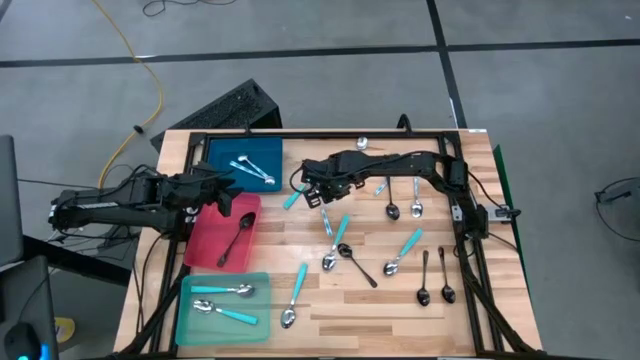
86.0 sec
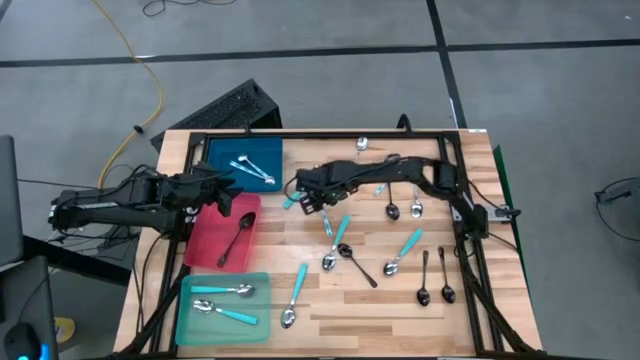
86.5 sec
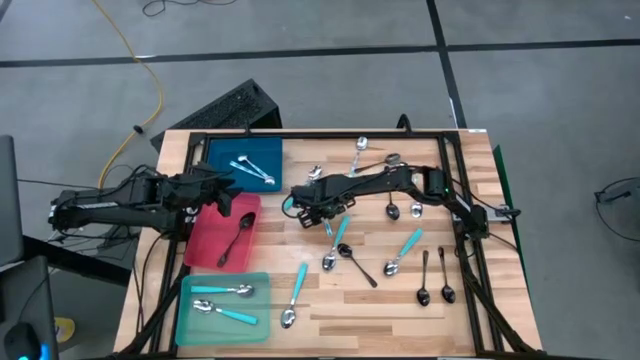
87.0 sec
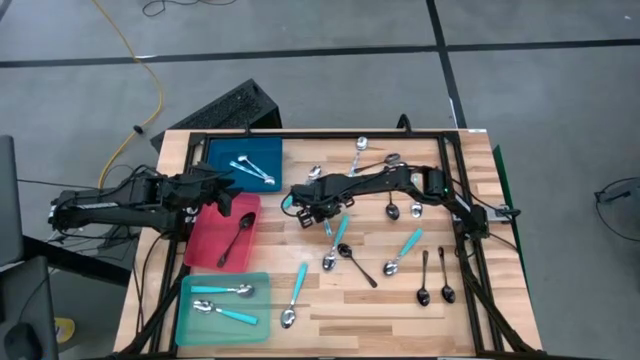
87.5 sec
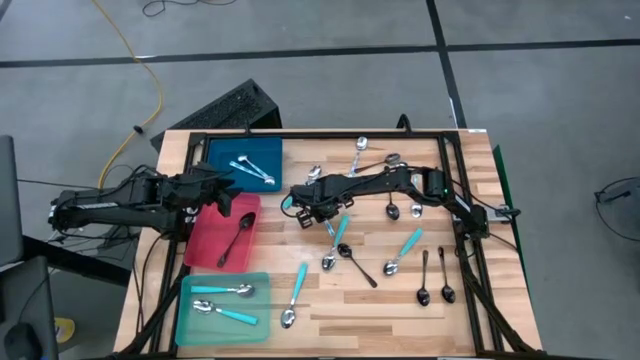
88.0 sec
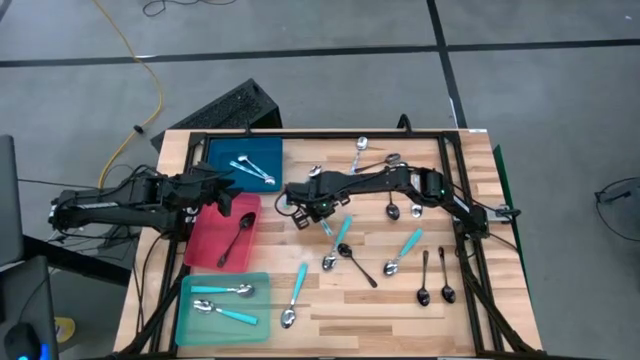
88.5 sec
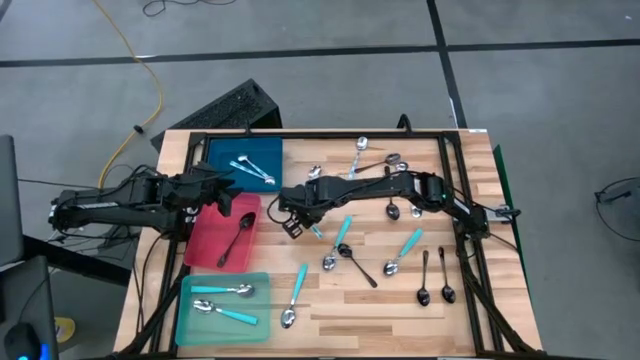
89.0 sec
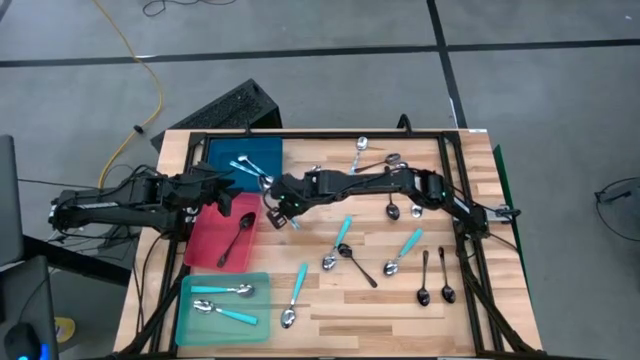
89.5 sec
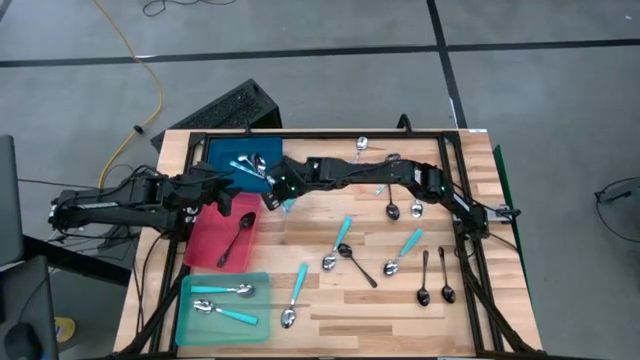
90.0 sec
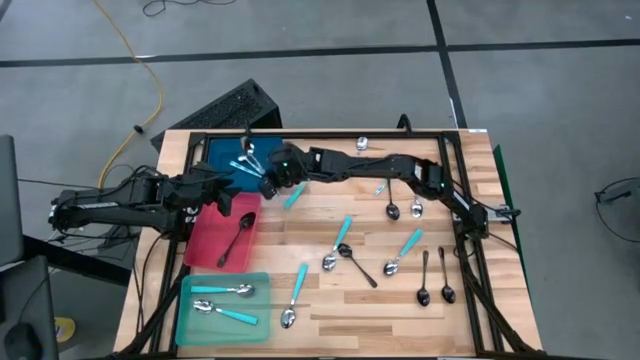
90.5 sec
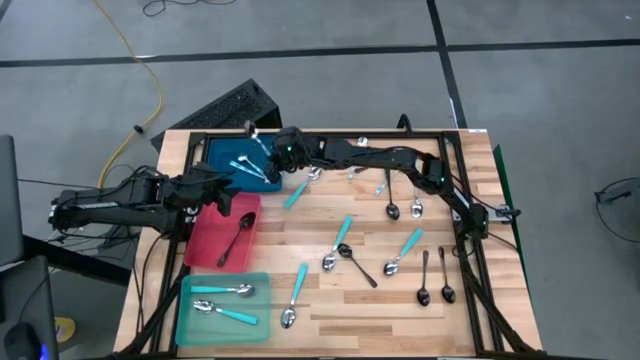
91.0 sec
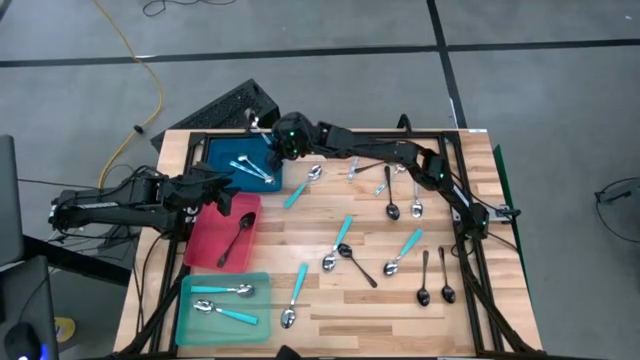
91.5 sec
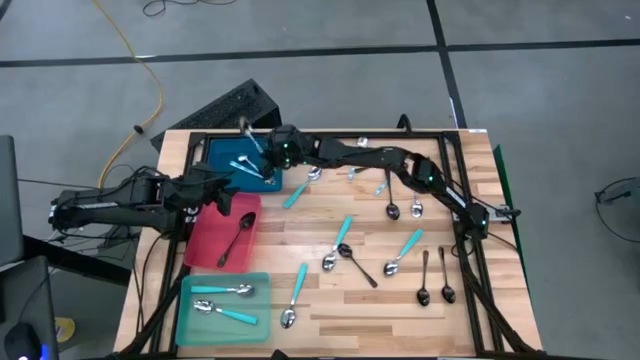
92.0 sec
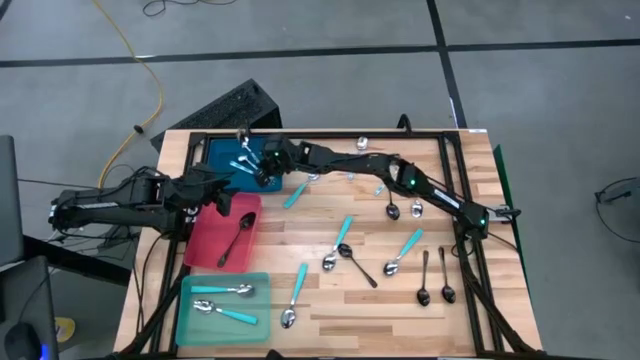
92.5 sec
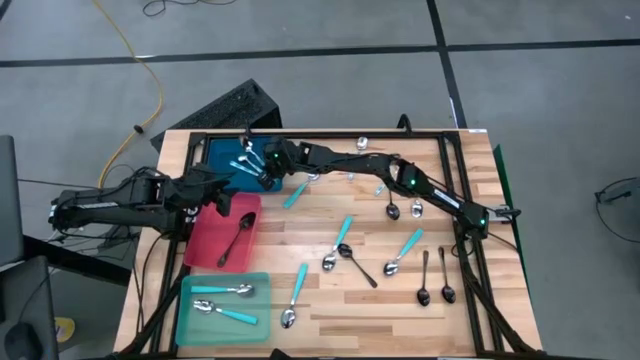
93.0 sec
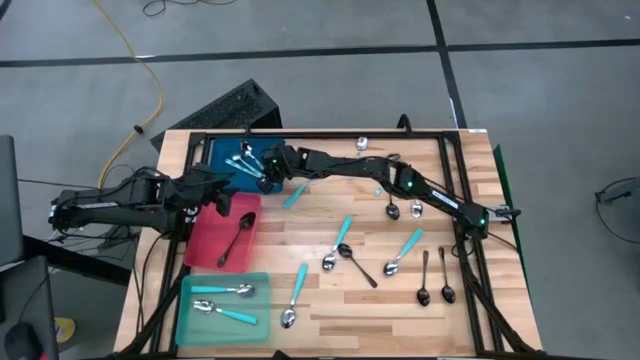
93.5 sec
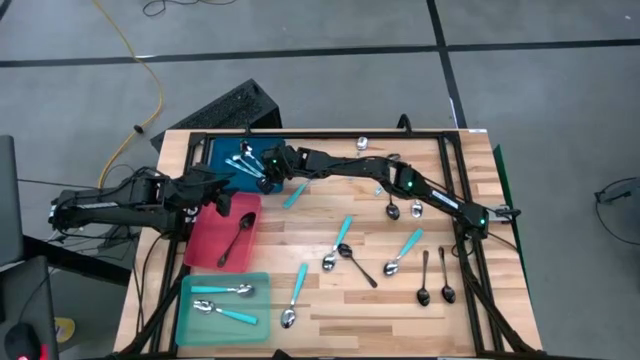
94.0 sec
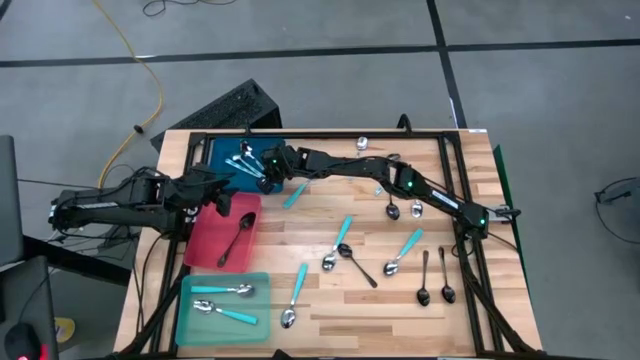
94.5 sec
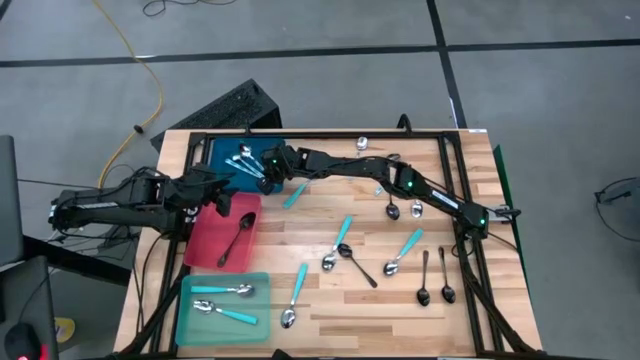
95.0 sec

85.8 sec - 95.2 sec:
Task: Sort silverware by color (type)
Put the blue patterned spoon into the blue bin

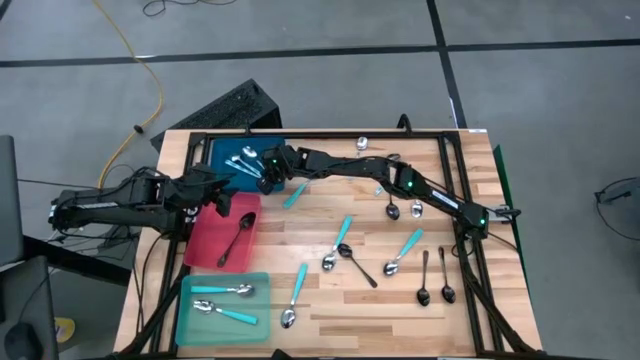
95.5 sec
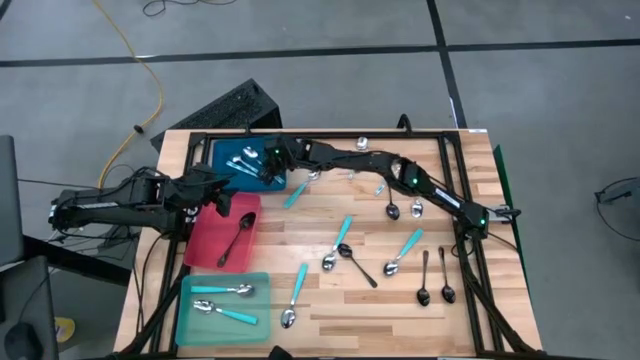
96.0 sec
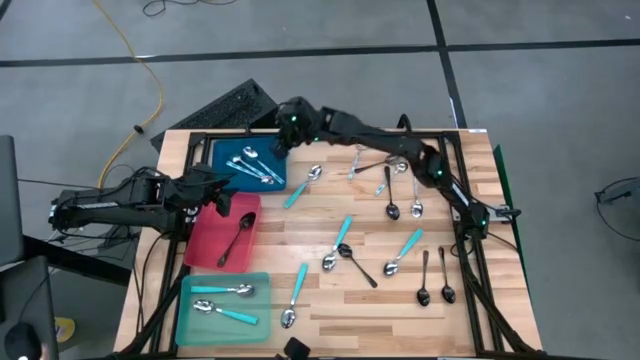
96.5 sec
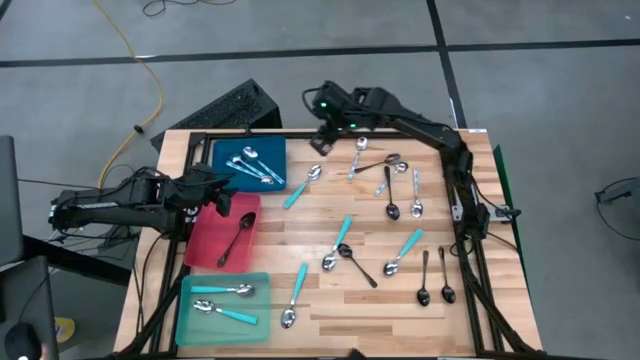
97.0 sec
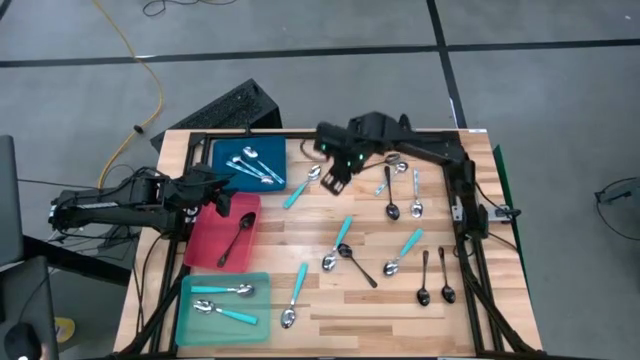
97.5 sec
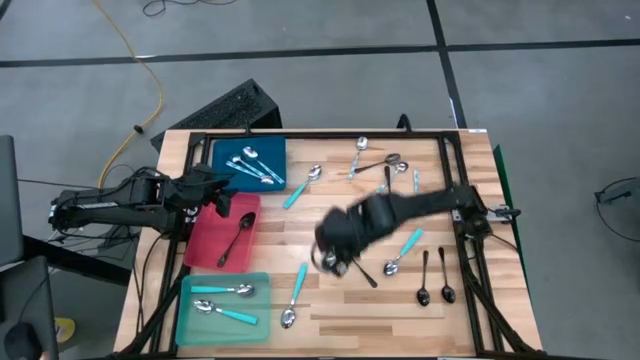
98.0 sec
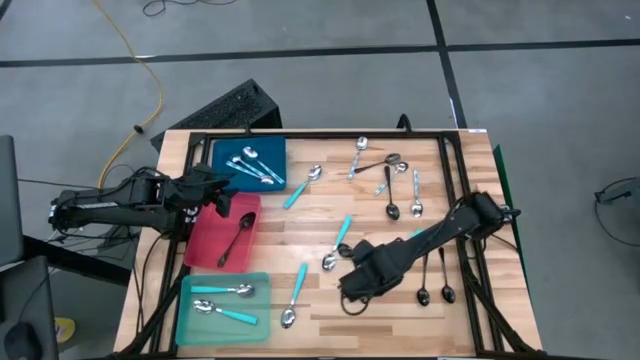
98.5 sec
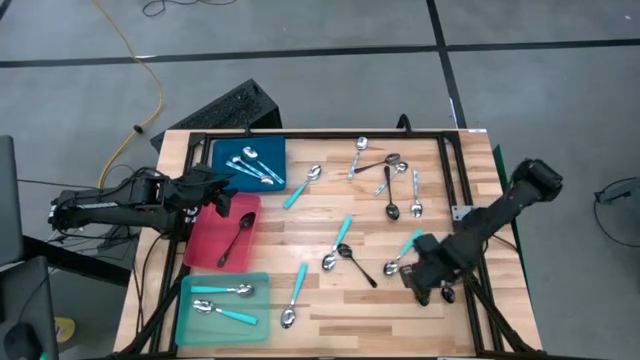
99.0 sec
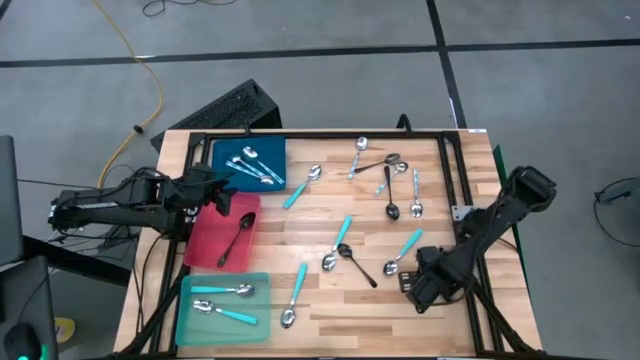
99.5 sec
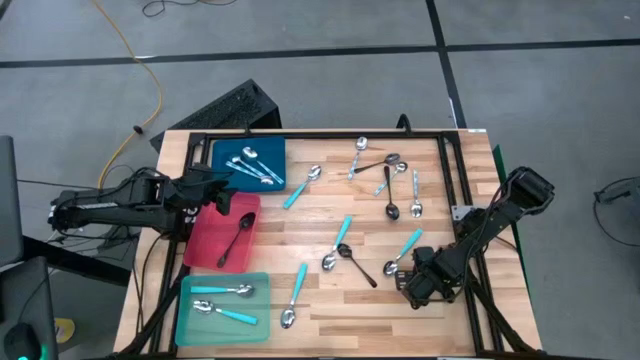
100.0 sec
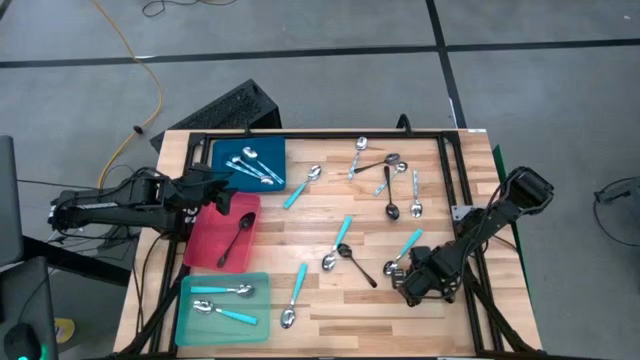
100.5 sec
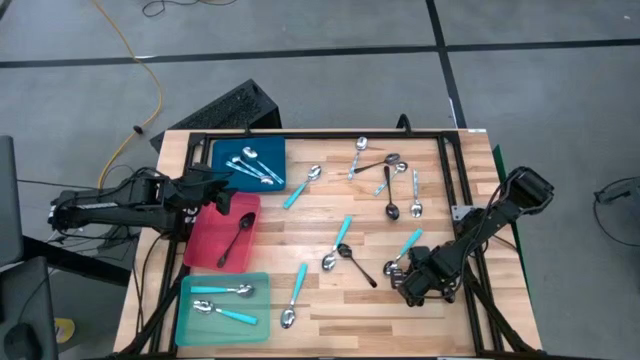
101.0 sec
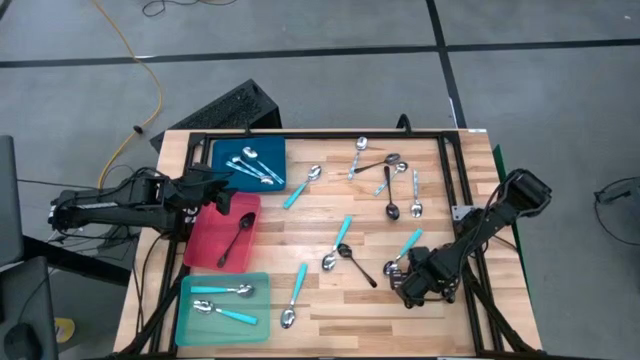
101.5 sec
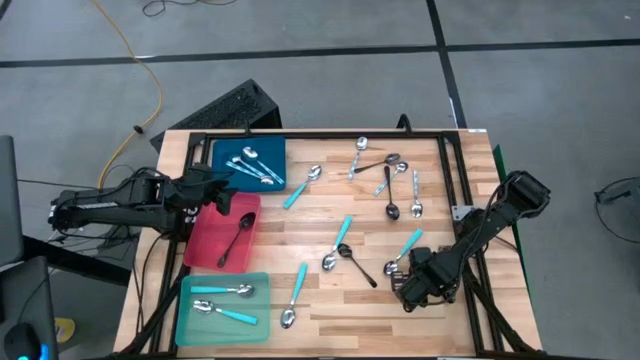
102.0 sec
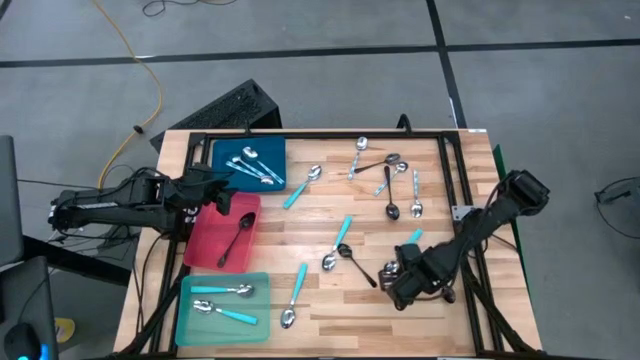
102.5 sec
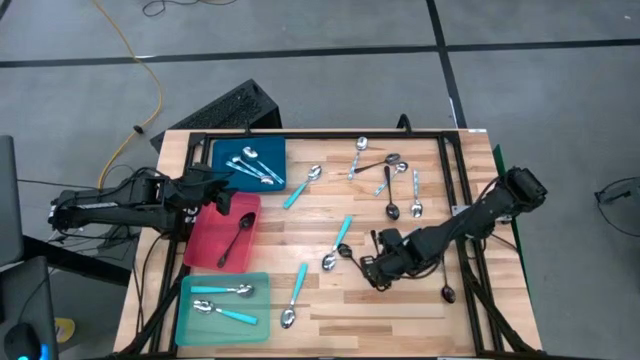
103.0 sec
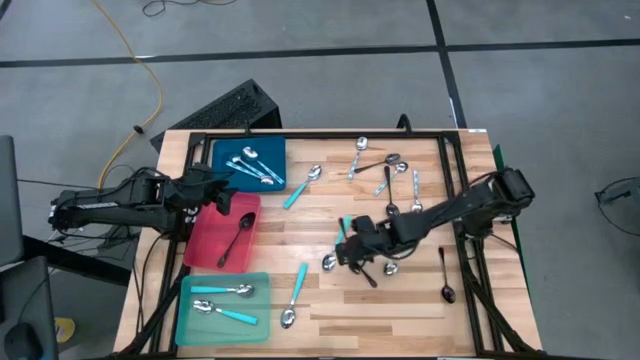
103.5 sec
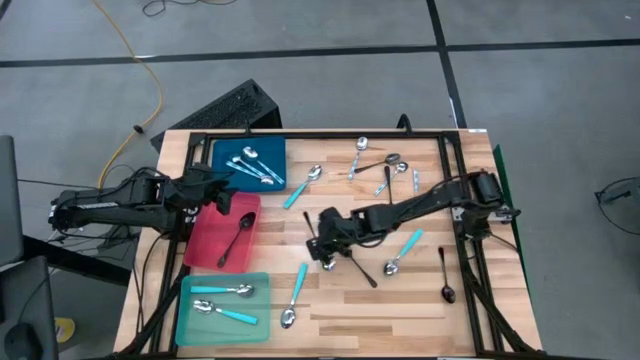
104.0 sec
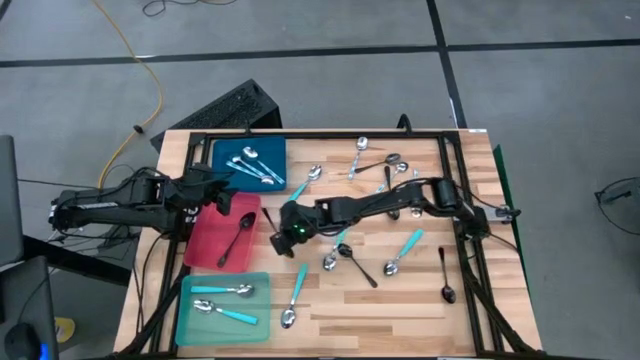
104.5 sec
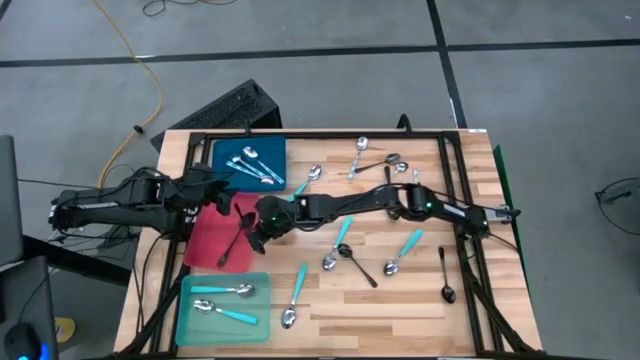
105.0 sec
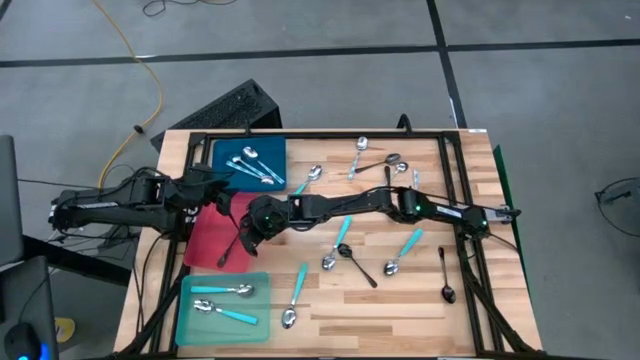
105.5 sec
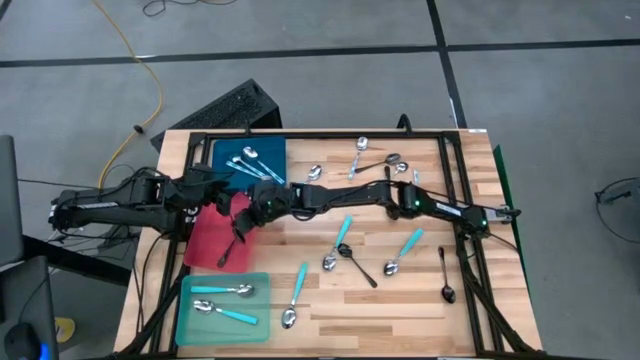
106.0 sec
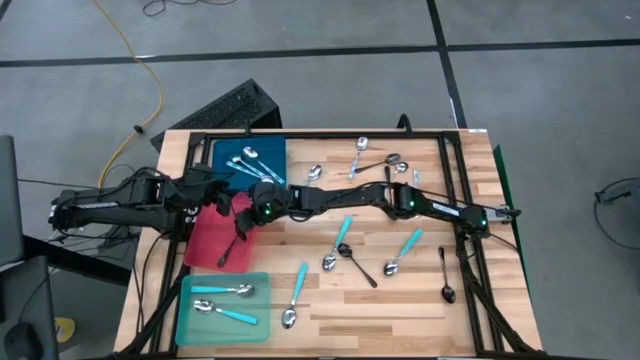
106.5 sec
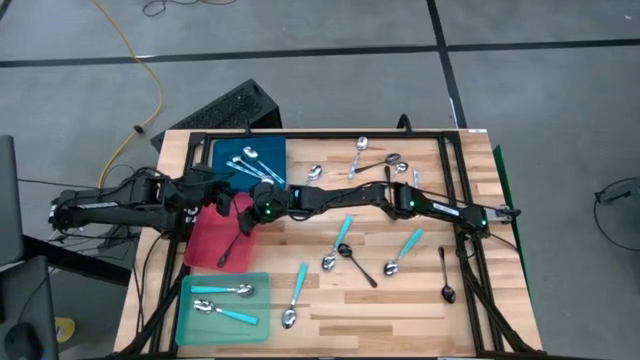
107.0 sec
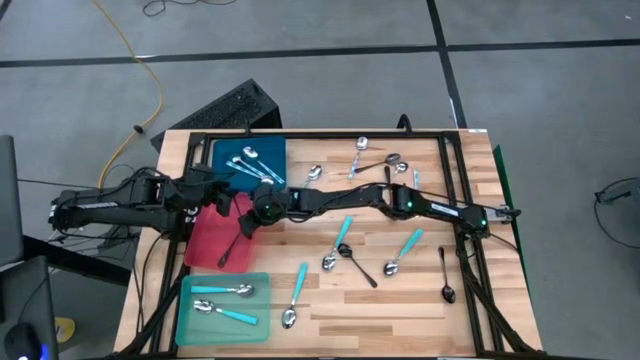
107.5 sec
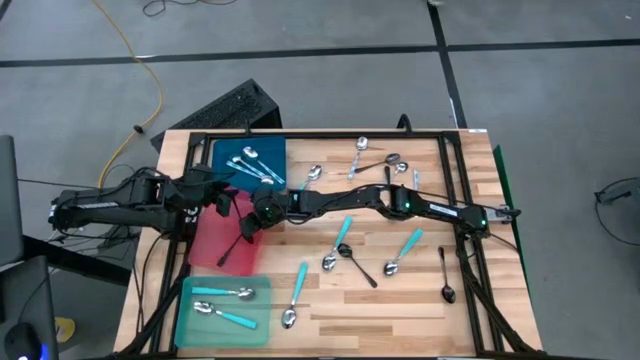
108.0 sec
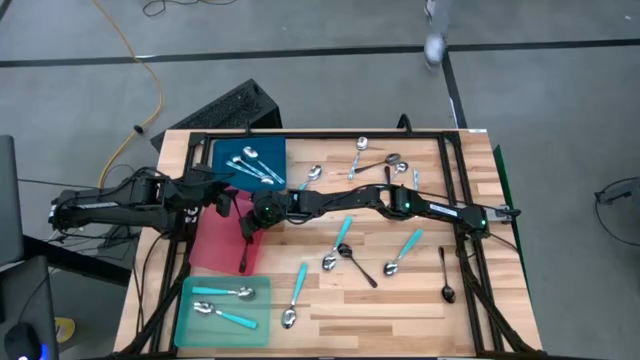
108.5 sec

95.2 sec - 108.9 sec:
Put the black spoon into the red bin
